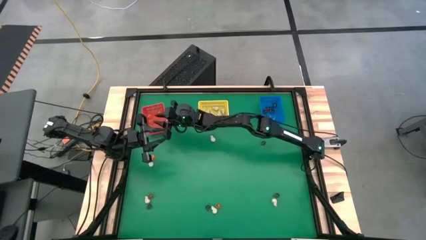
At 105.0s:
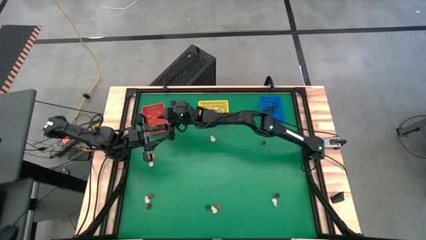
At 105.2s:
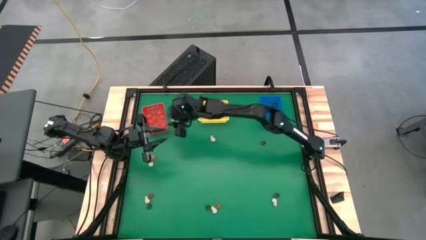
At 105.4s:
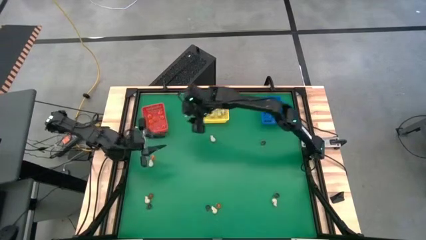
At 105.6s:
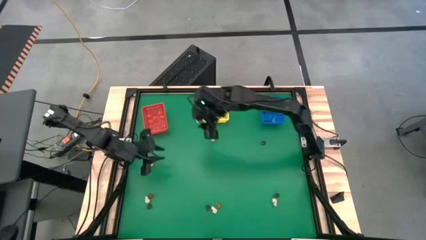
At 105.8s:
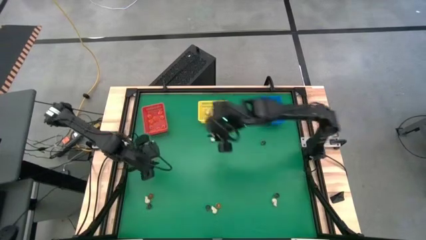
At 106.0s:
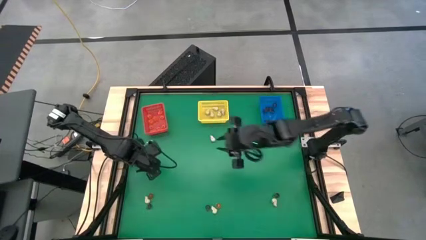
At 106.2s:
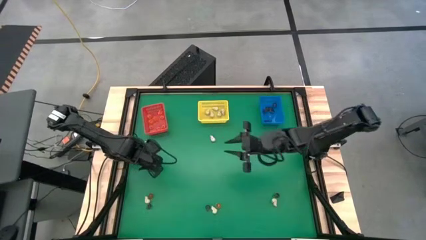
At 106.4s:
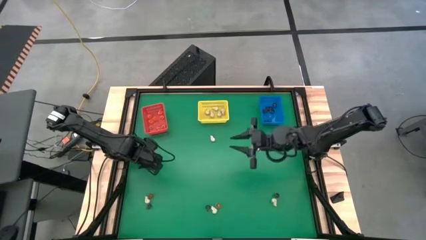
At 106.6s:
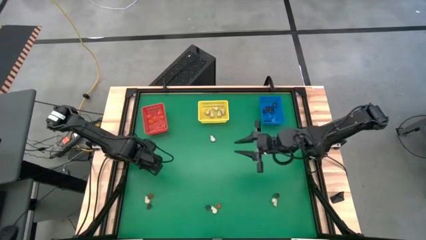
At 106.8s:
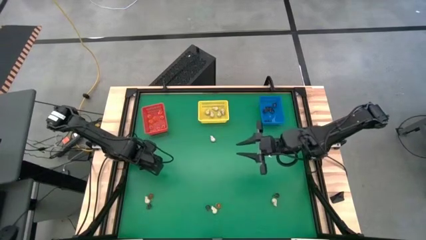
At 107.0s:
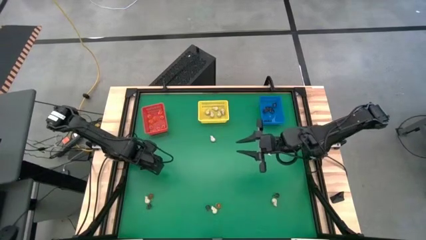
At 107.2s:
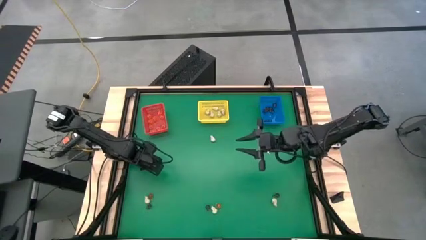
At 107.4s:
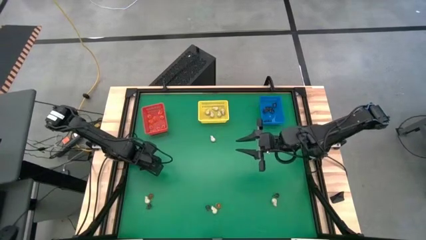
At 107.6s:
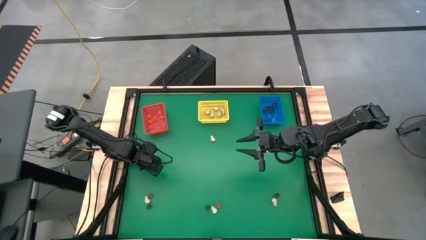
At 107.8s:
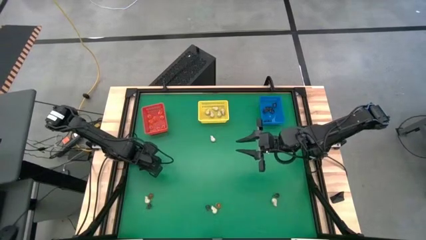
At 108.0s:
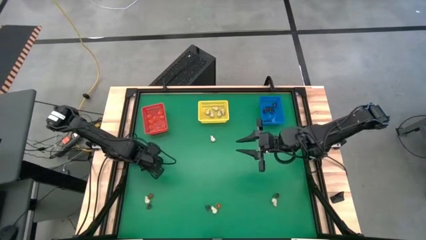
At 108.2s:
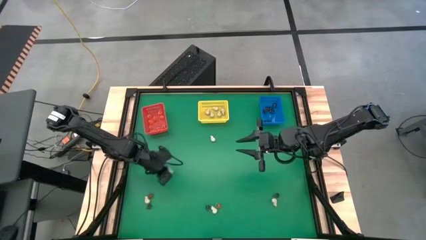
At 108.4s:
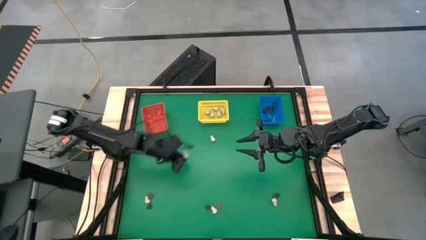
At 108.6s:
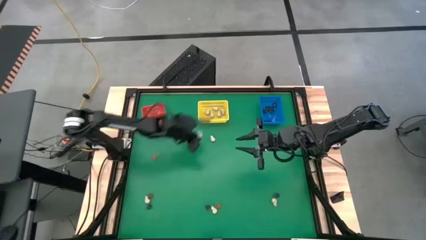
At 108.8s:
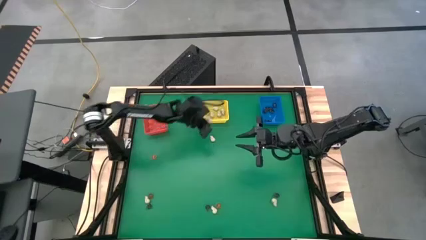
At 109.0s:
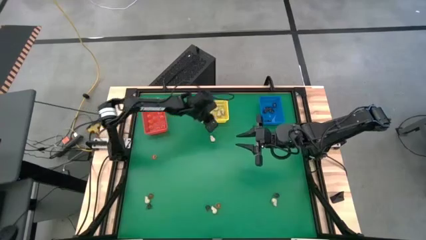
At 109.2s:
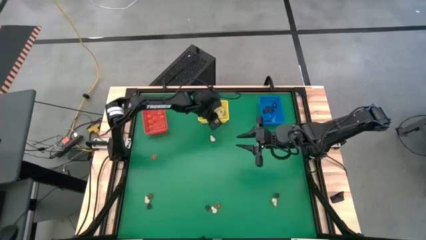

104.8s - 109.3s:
Task: Sort Halloween decoration
Put the white skull toy into the yellow bin

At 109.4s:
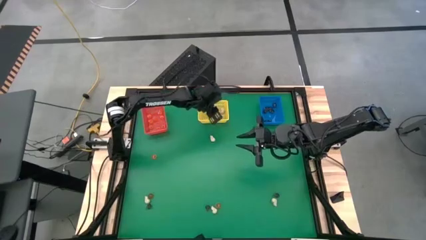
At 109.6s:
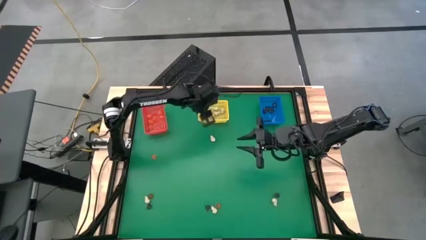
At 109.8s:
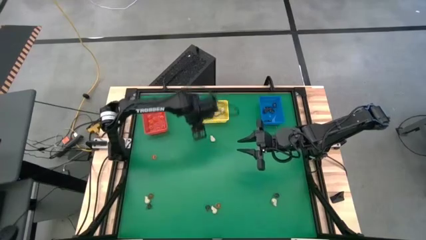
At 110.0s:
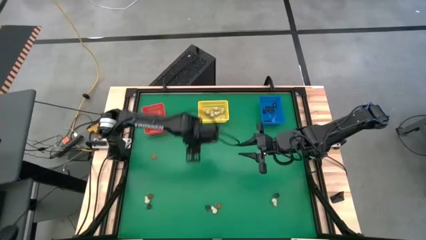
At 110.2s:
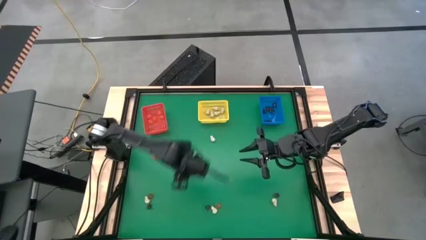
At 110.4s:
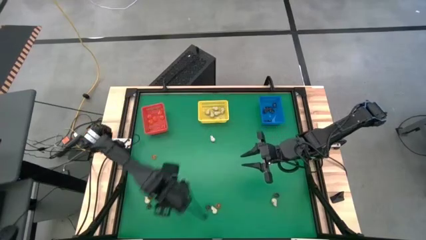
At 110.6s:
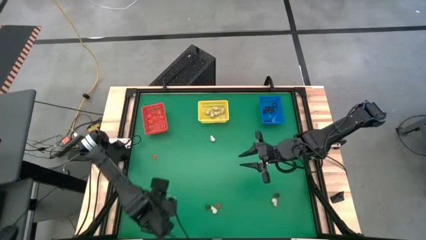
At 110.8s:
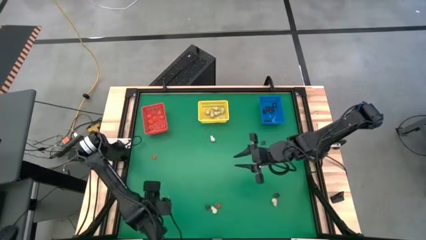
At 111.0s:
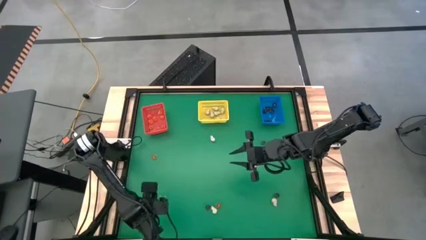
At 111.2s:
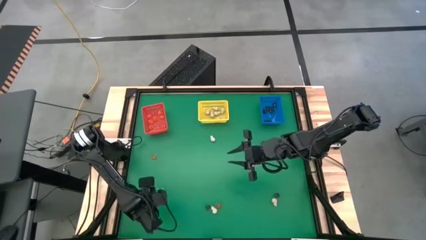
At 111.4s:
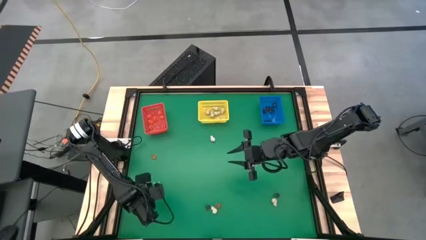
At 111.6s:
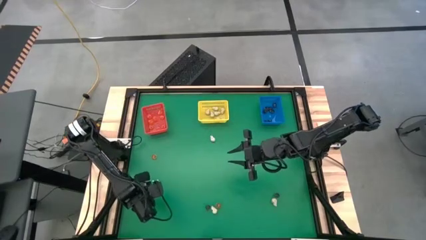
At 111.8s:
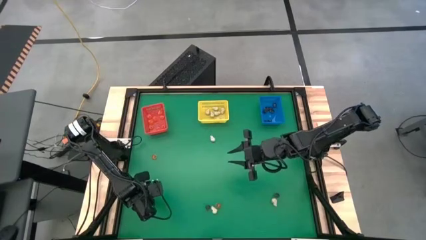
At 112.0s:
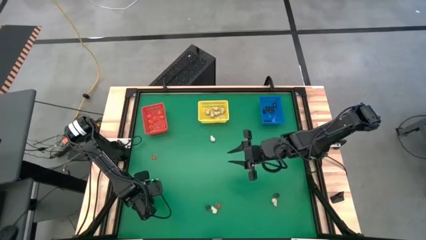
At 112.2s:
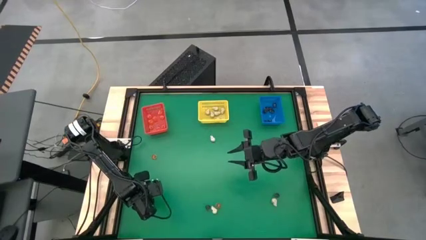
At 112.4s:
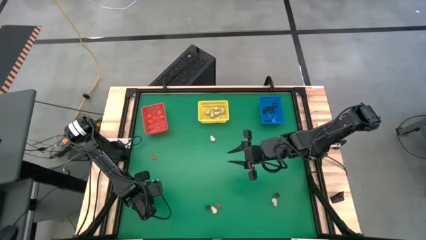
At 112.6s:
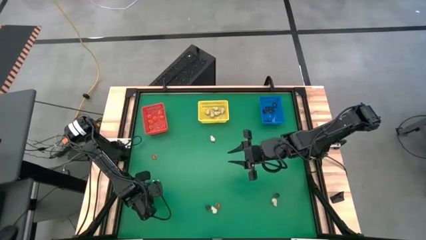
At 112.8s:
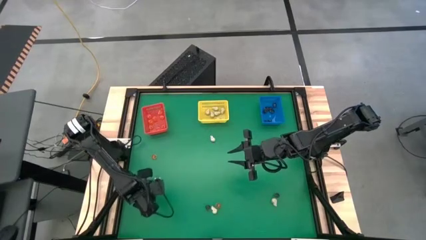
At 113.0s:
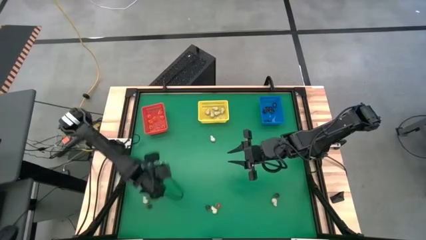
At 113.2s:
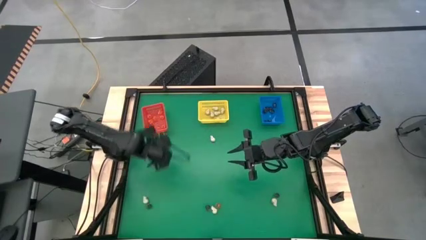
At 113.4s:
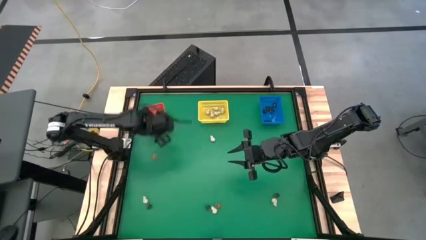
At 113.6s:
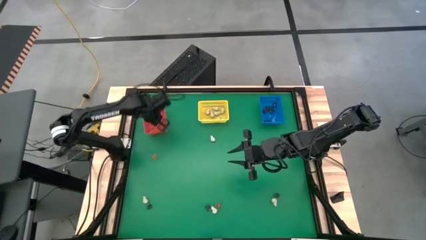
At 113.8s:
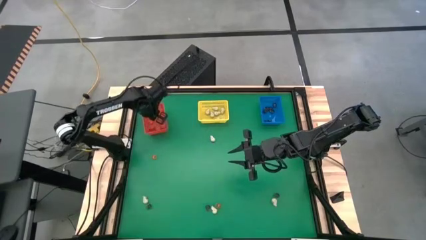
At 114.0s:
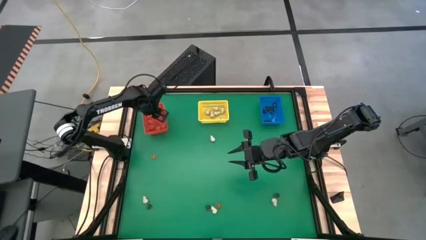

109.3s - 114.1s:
Put the orange flower toy into the red bin

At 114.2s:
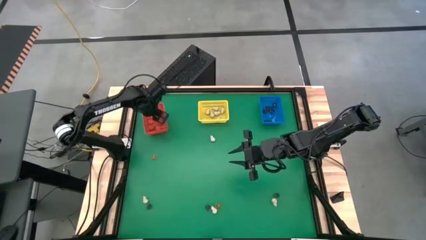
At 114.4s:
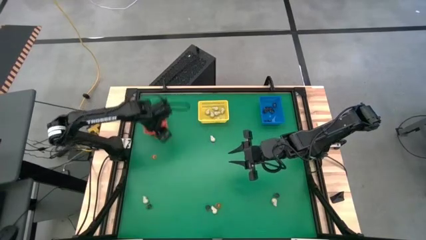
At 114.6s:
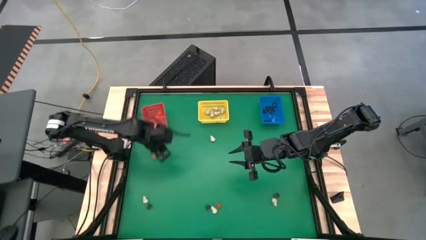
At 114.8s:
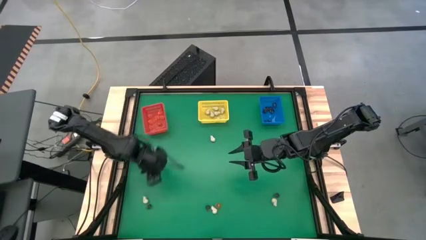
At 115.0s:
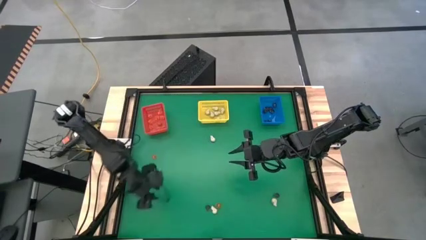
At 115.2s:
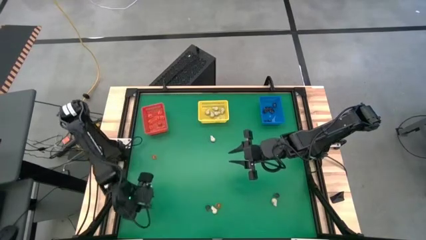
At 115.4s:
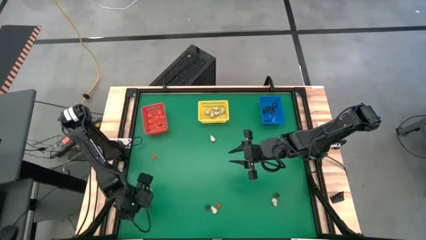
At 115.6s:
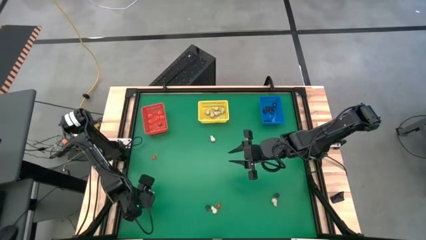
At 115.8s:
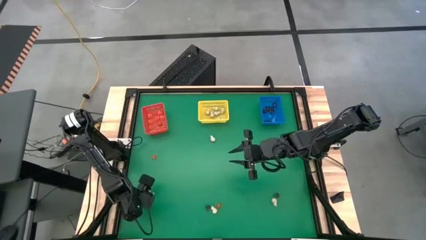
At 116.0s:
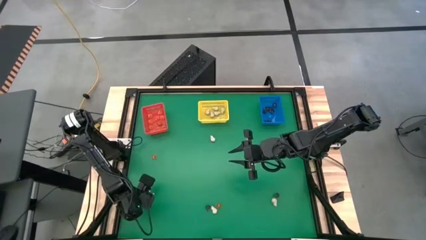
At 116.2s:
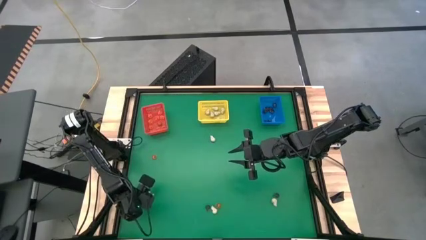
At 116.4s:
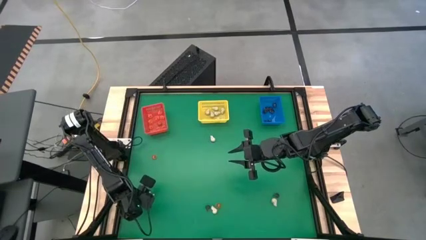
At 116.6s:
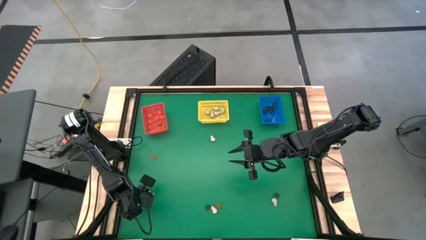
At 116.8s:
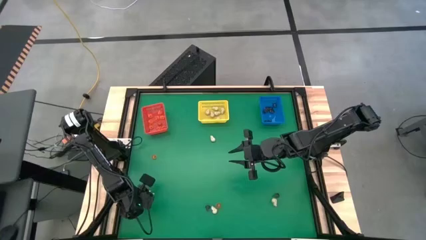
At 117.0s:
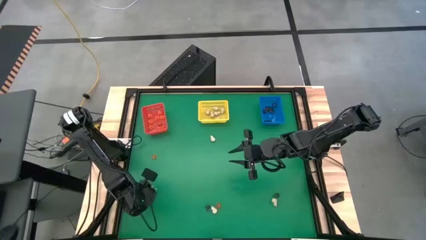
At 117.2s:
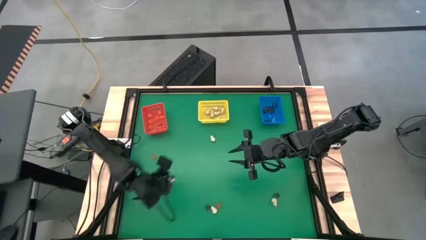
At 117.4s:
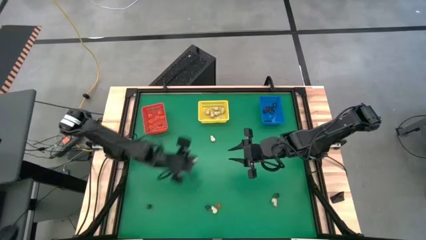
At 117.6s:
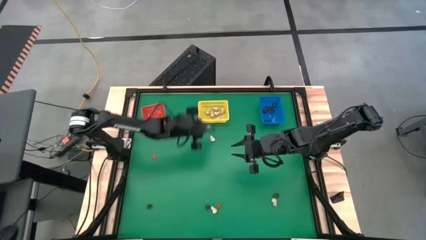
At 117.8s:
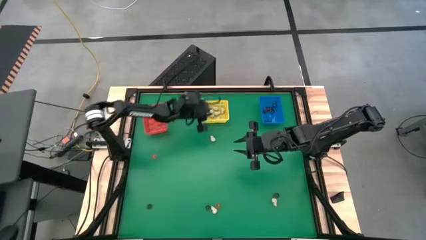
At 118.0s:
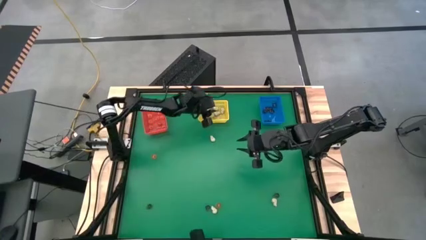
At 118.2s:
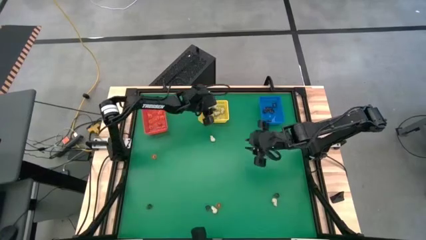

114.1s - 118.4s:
Put the white skull toy into the yellow bin

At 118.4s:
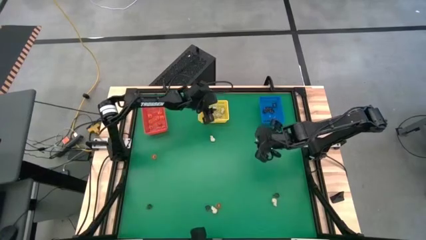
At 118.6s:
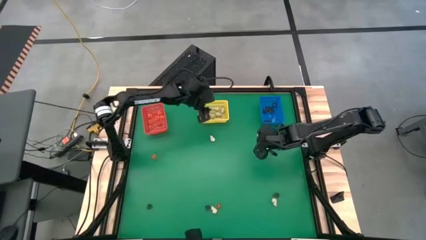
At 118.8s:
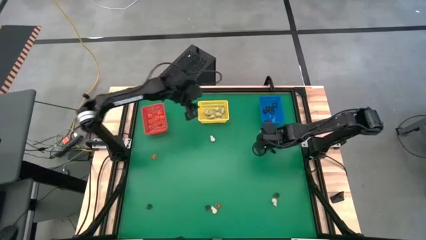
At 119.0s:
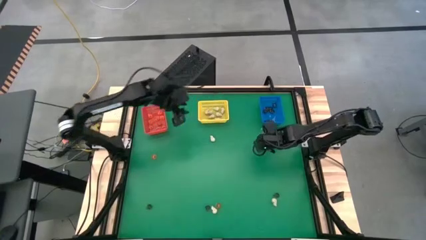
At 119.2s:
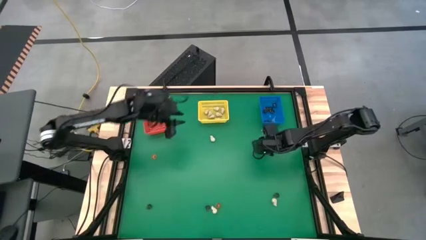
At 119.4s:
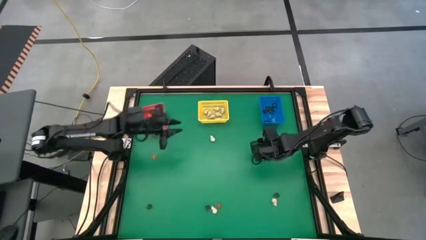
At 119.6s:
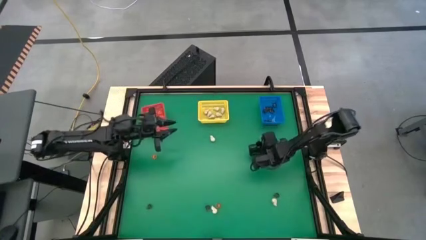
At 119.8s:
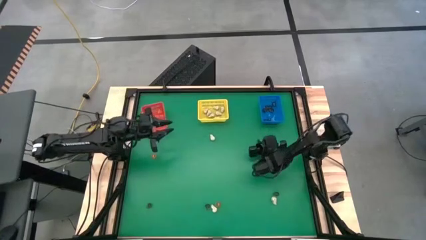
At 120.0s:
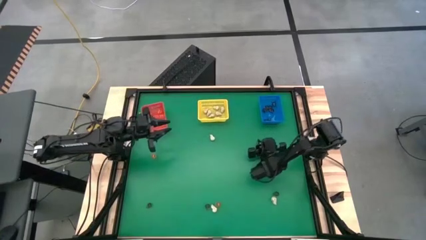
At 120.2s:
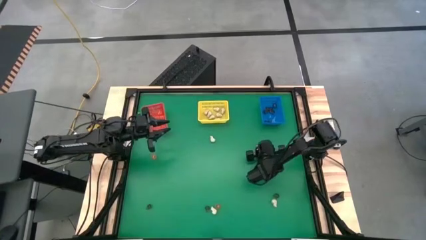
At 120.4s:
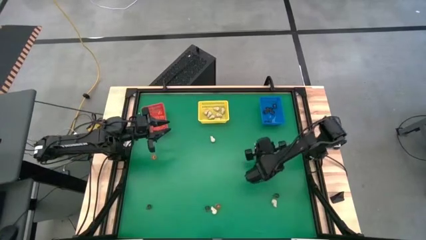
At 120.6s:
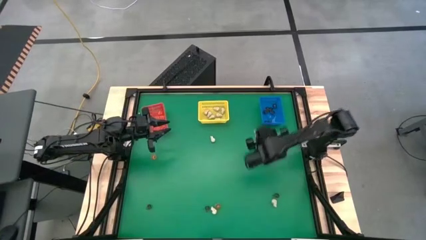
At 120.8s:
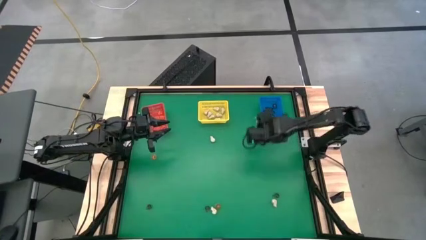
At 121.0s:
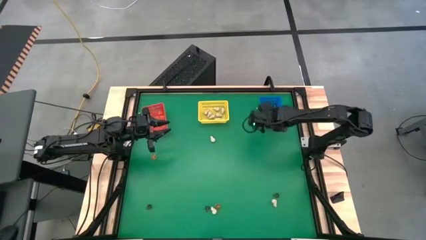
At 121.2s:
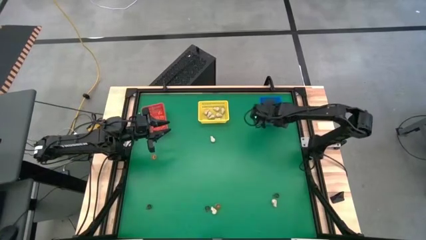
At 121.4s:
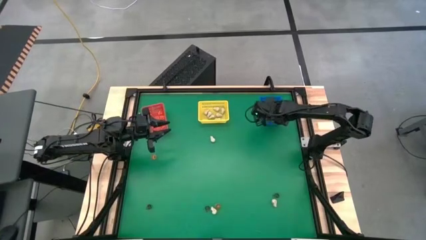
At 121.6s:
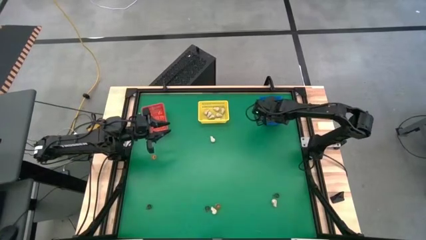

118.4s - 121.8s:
Put the purple skull toy into the blue bin

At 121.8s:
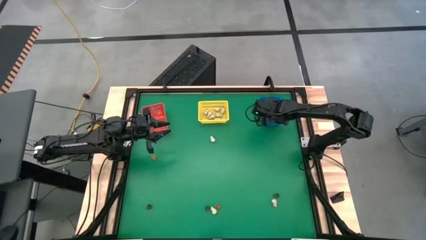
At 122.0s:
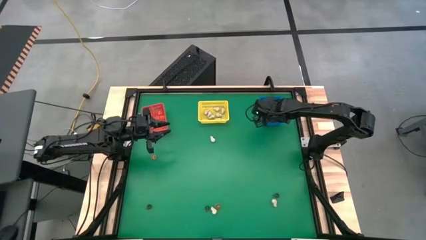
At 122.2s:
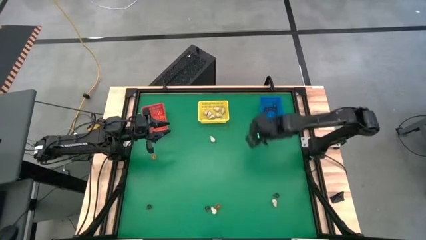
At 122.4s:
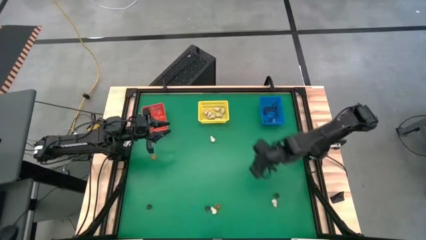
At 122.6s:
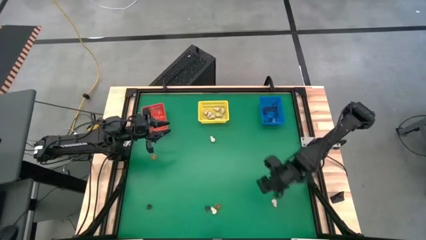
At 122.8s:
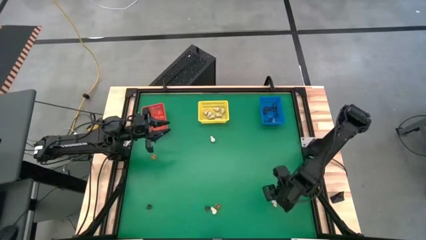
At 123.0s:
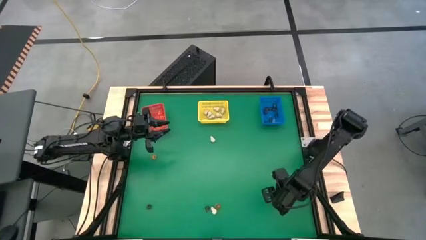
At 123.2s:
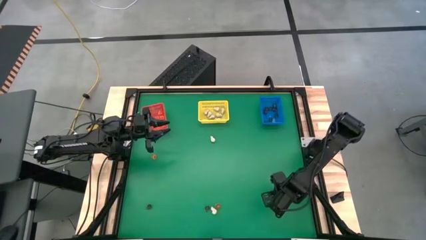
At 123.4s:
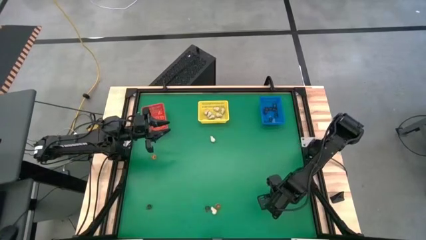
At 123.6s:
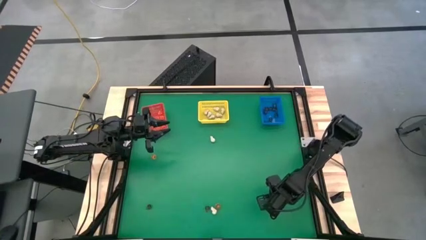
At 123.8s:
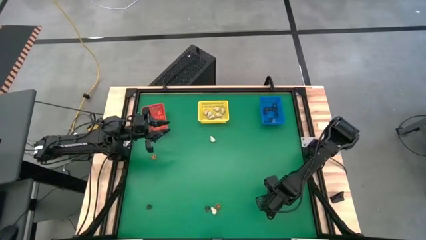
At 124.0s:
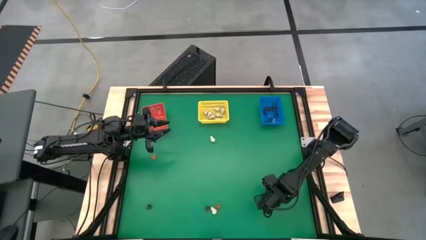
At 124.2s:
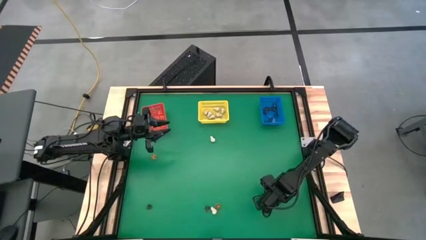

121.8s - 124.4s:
Put the white skull toy into the yellow bin
